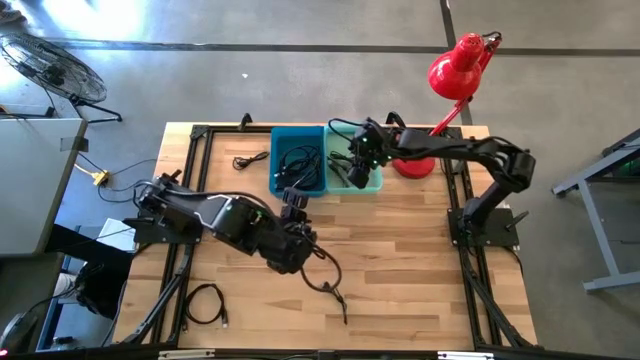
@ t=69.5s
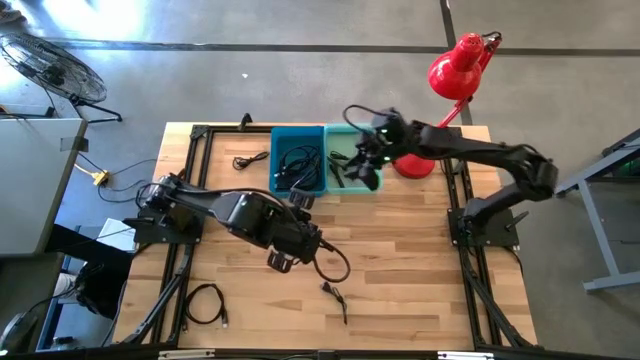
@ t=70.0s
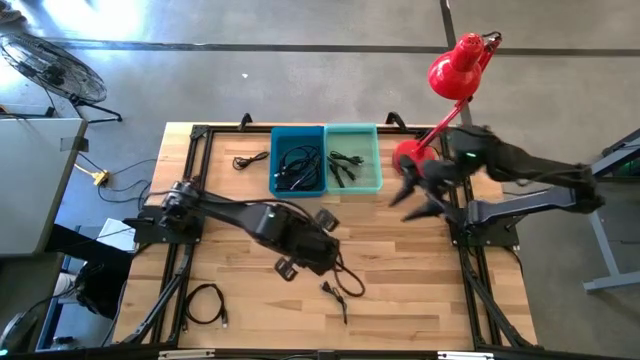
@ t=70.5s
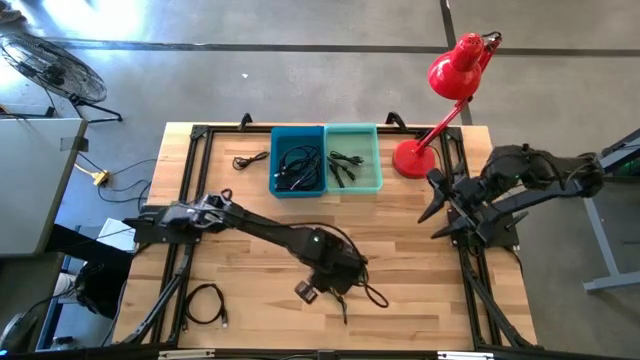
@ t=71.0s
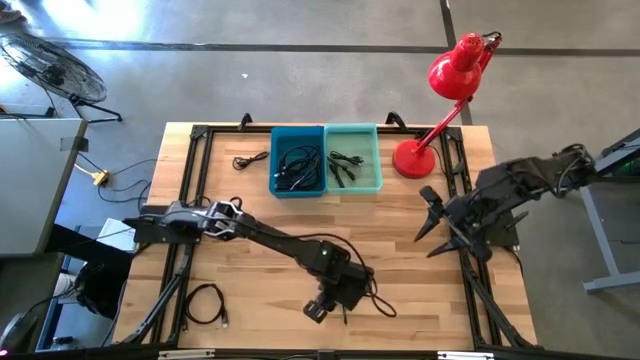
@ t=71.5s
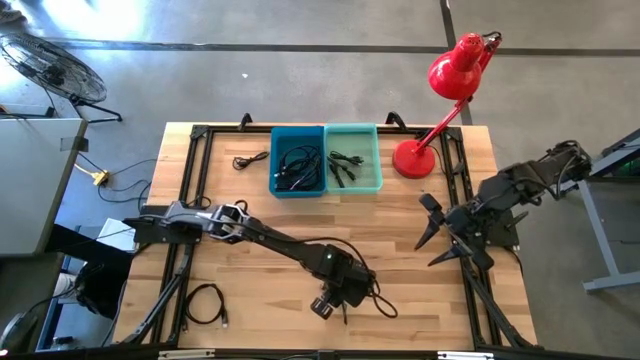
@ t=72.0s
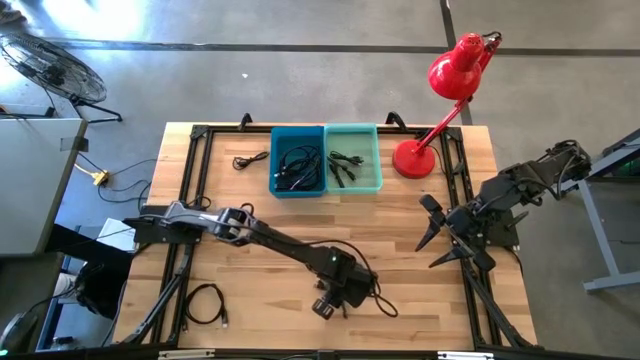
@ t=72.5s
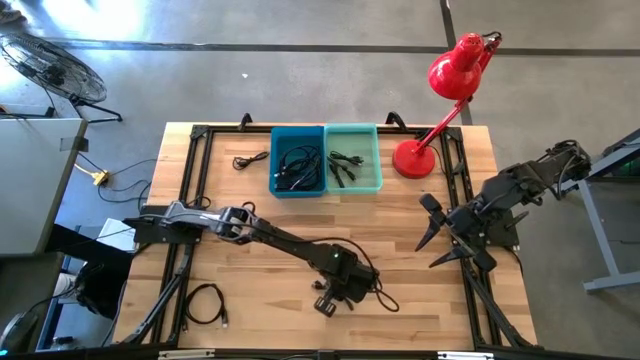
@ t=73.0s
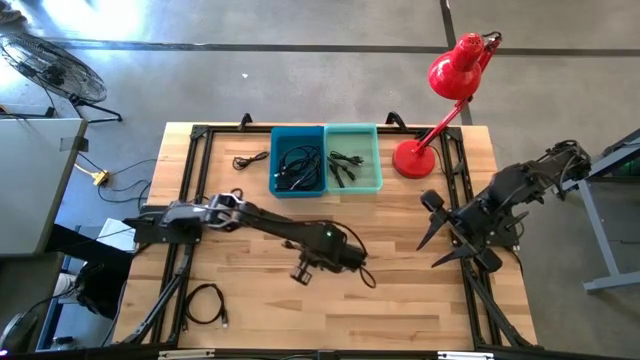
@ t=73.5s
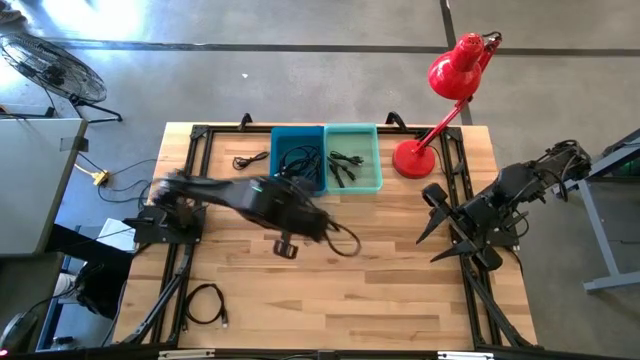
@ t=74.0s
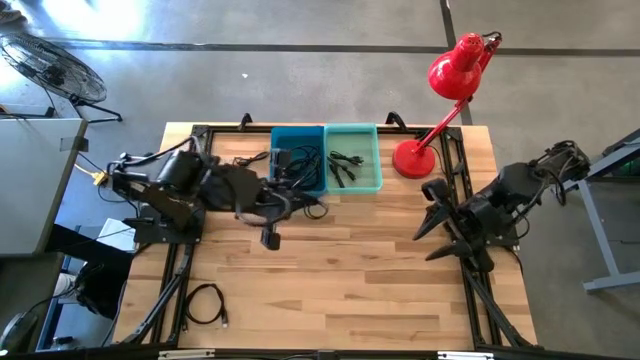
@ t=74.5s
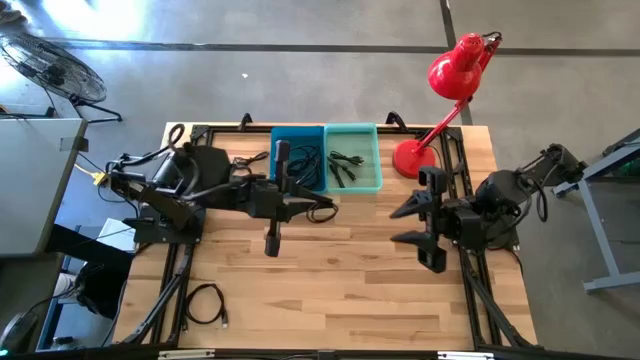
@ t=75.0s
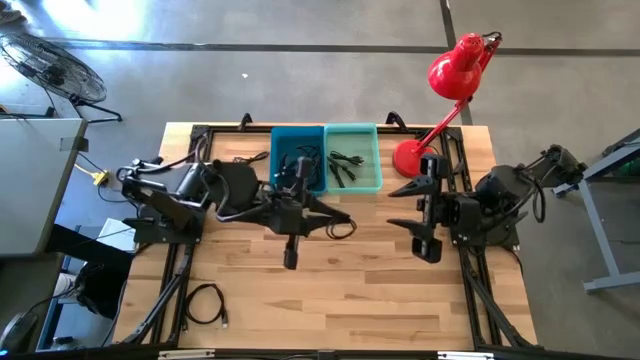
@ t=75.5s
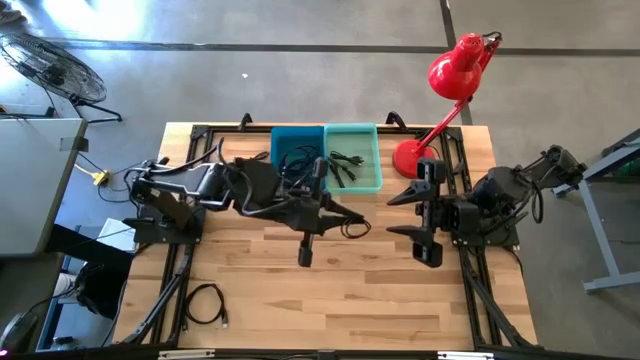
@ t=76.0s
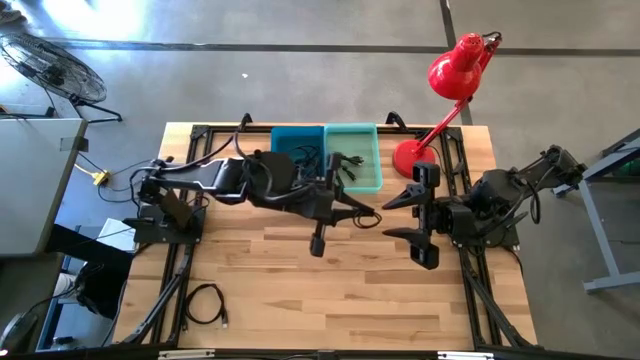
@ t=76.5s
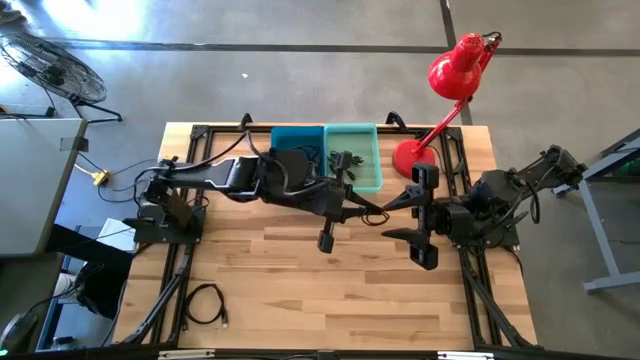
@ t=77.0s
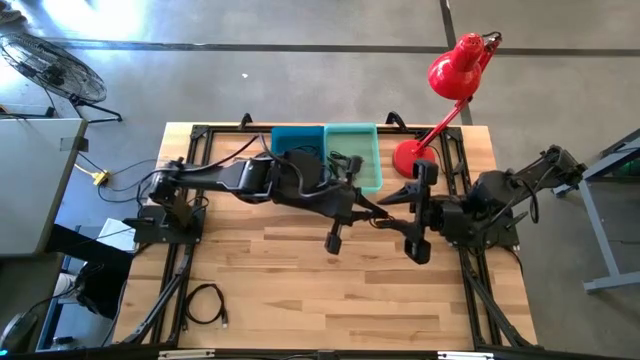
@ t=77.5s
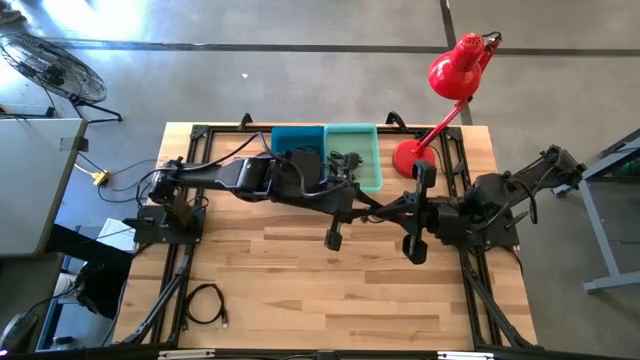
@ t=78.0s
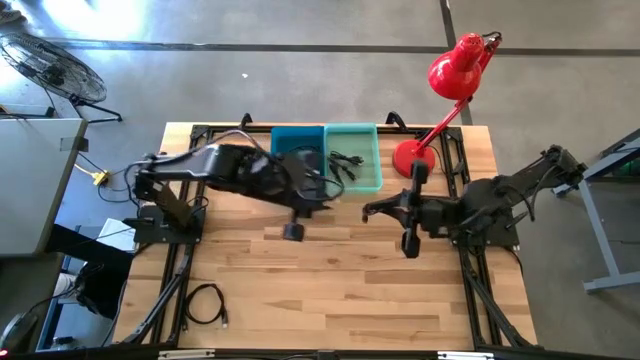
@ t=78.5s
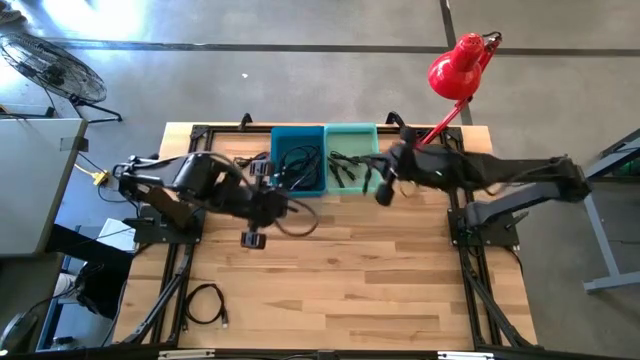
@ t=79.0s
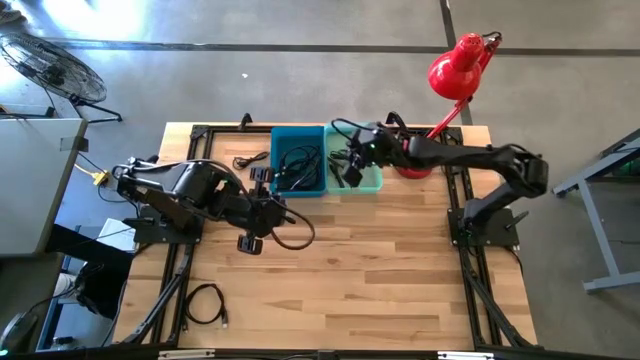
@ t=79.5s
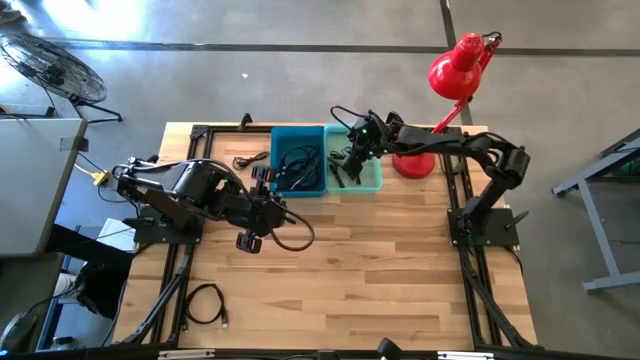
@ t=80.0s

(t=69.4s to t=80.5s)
Task: Pick & Place USB Port
Put the black USB cable into the green bin

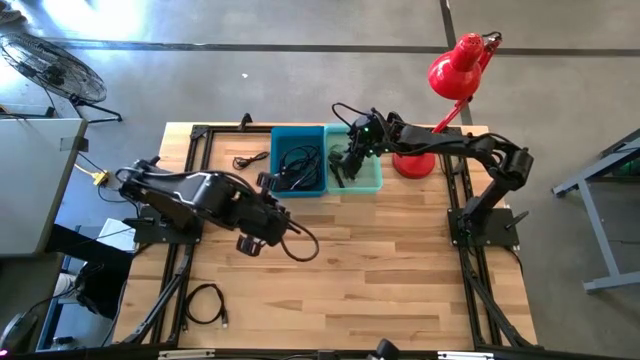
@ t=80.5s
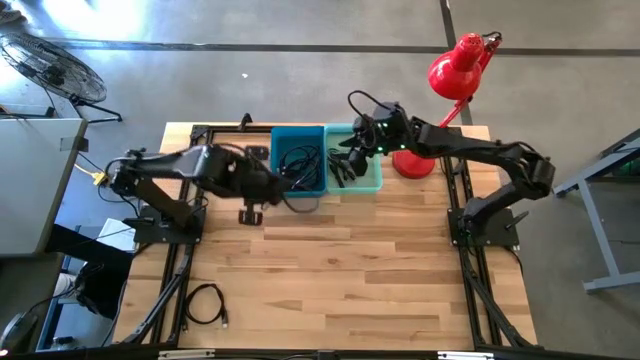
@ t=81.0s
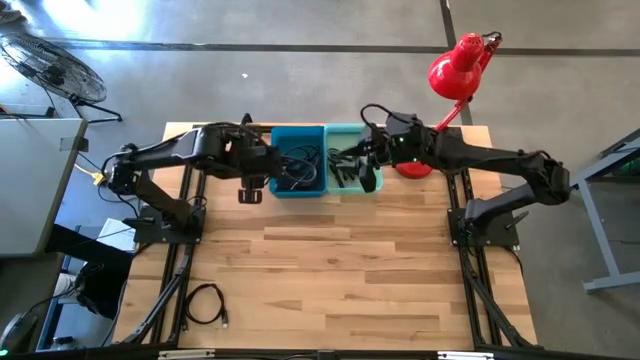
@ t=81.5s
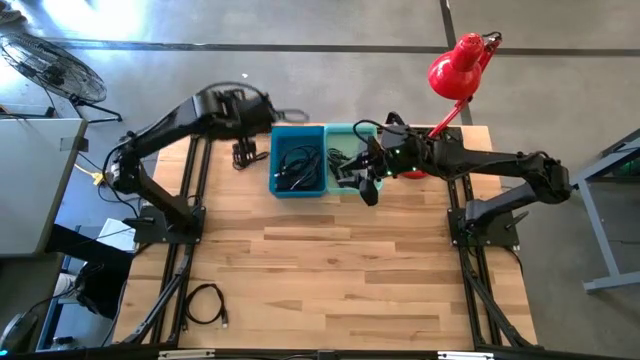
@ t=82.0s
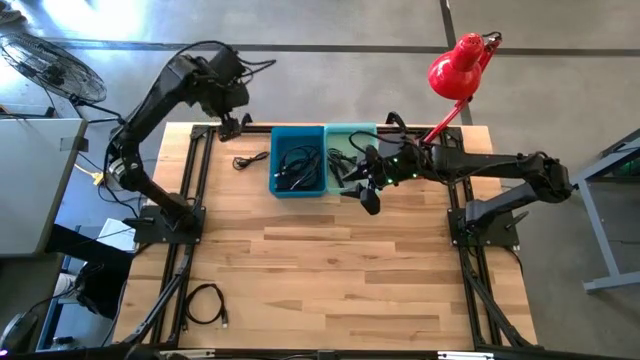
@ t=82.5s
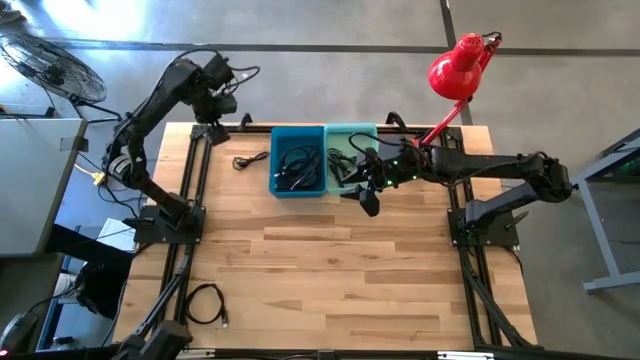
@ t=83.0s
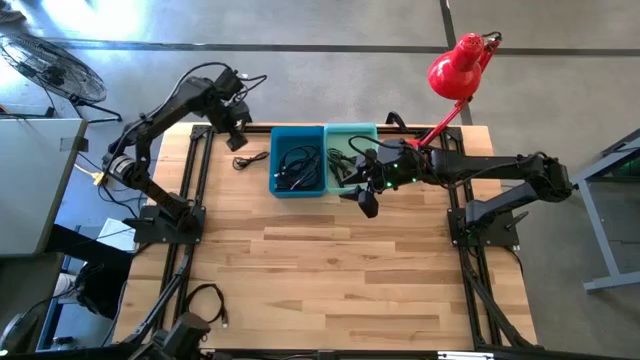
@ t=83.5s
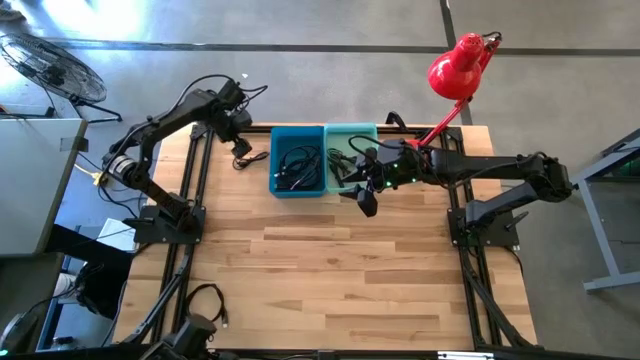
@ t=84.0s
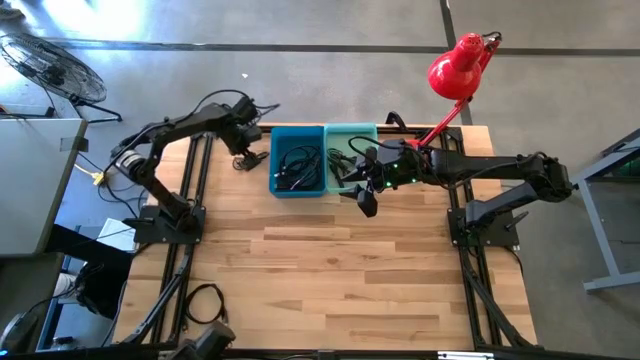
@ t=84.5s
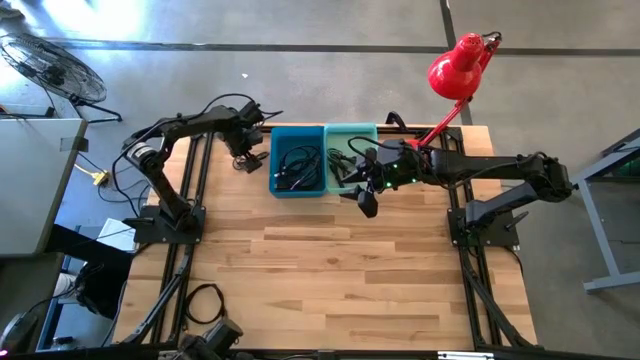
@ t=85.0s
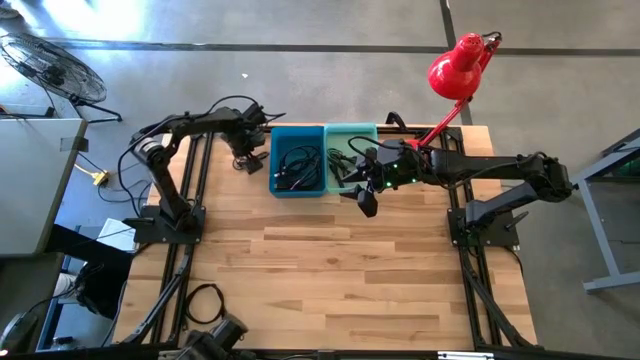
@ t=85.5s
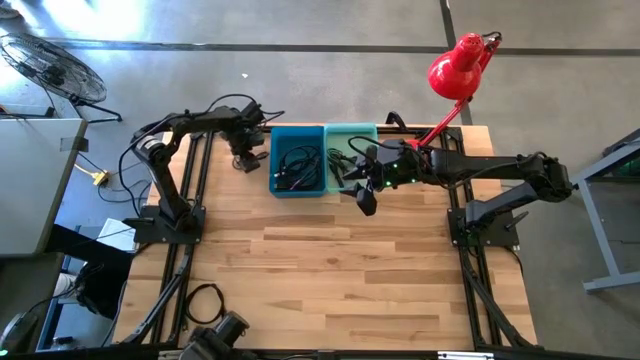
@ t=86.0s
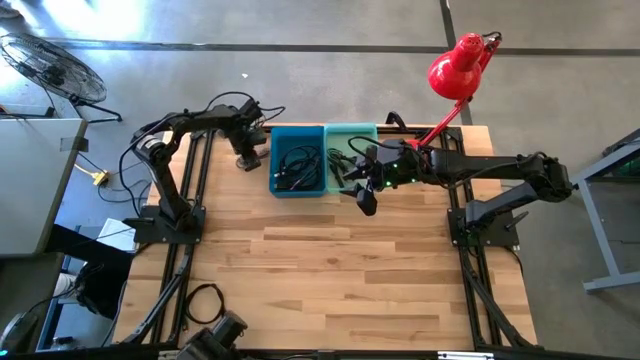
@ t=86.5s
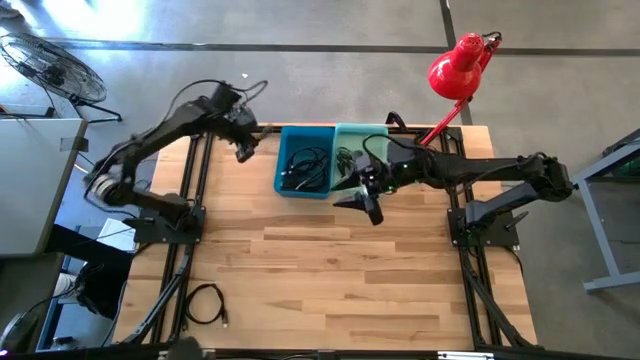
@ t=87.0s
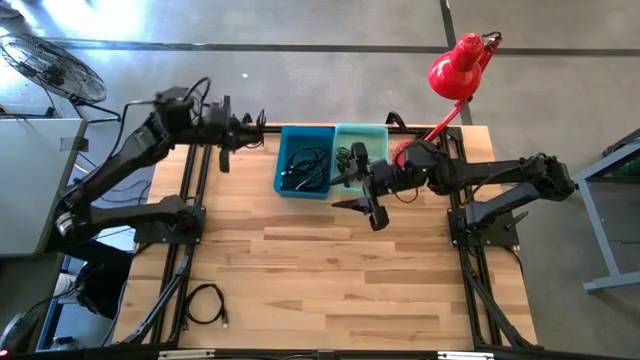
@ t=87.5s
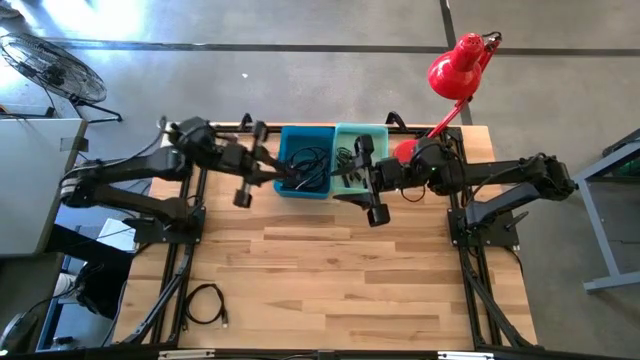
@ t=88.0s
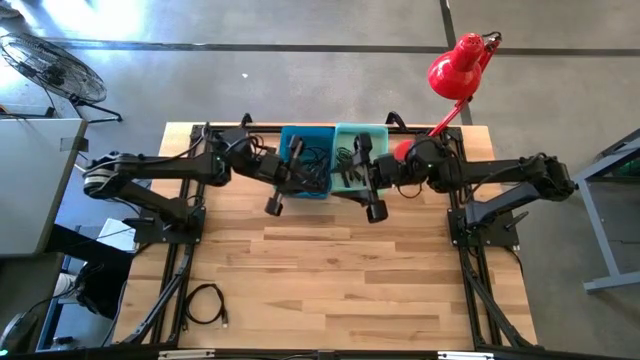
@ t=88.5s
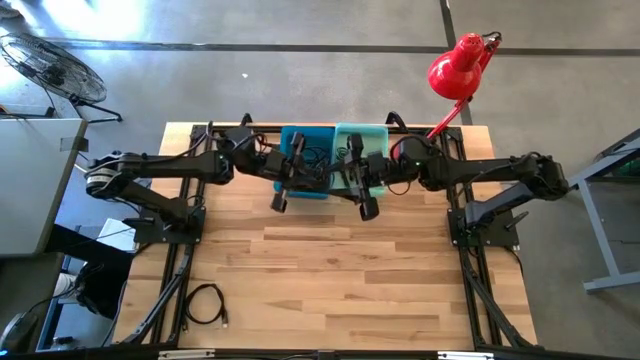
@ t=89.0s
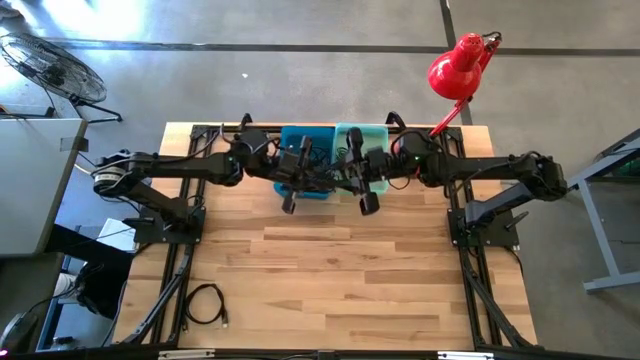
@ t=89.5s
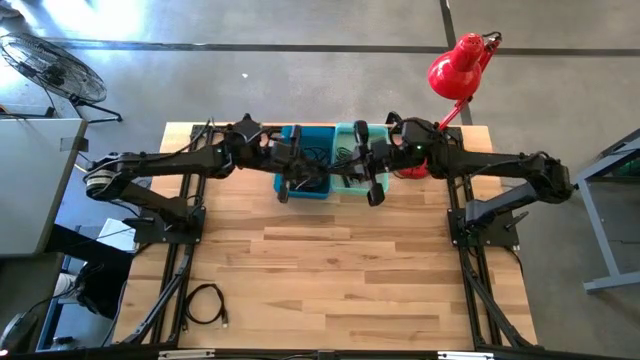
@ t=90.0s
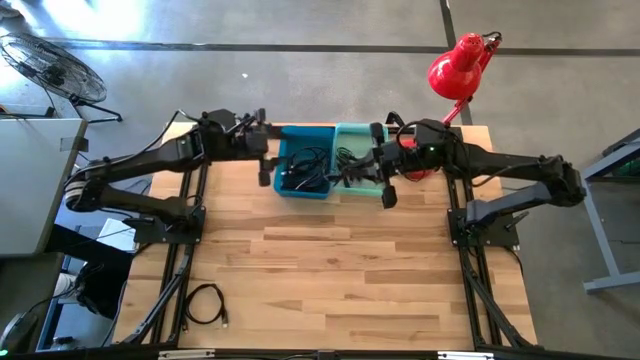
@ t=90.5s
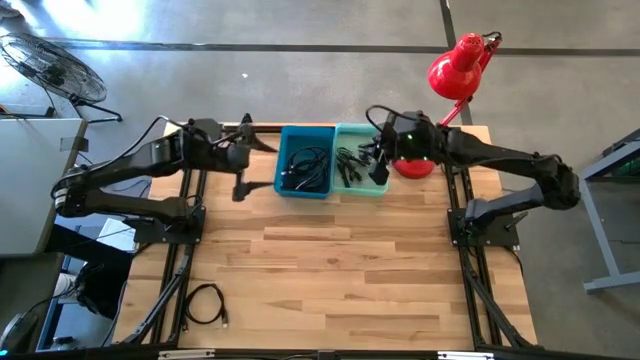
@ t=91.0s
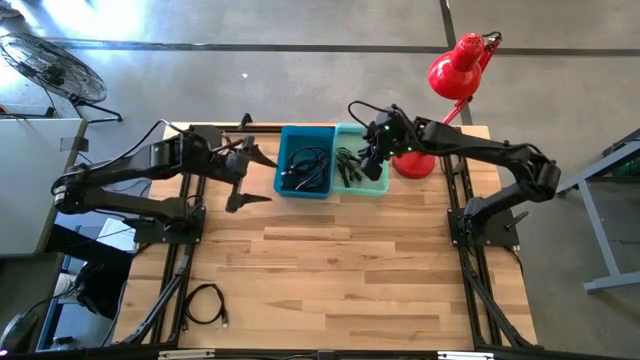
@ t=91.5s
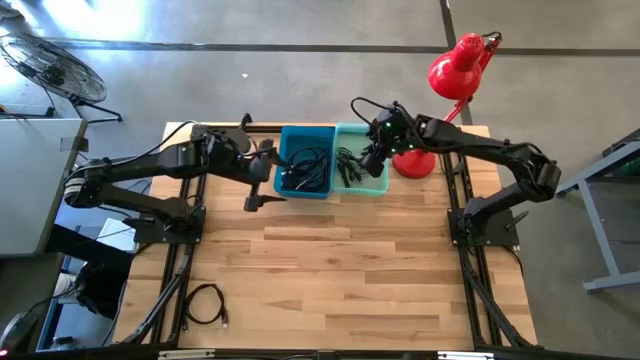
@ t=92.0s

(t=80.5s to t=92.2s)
Put the black USB cable into the green bin
